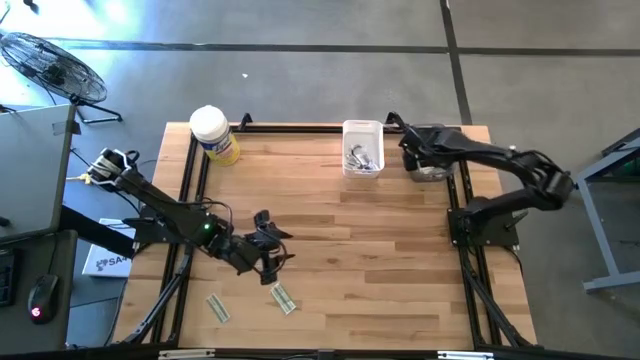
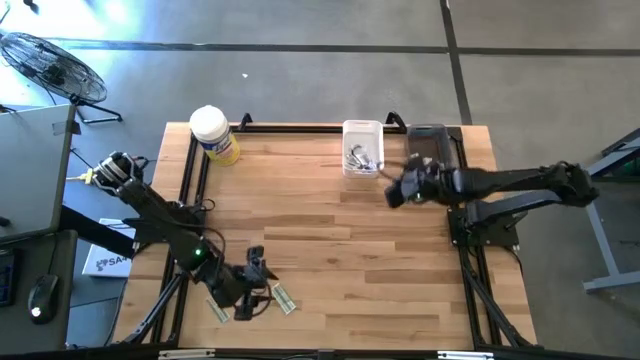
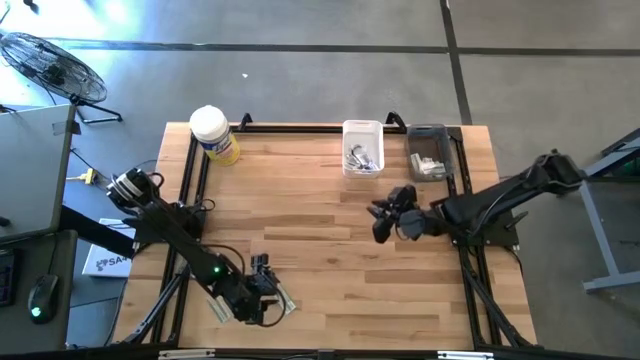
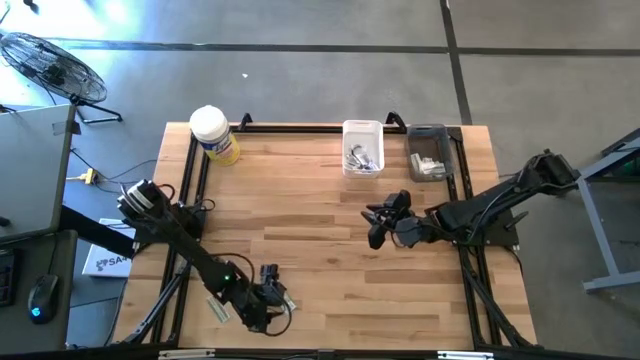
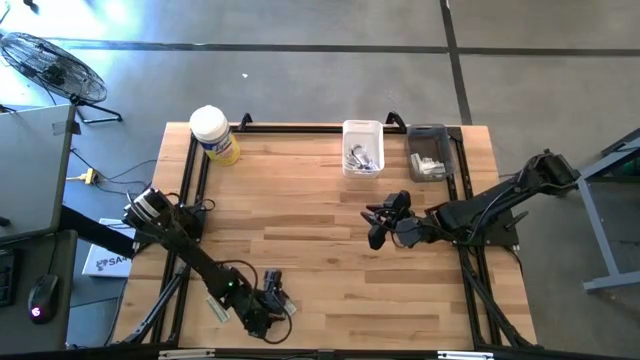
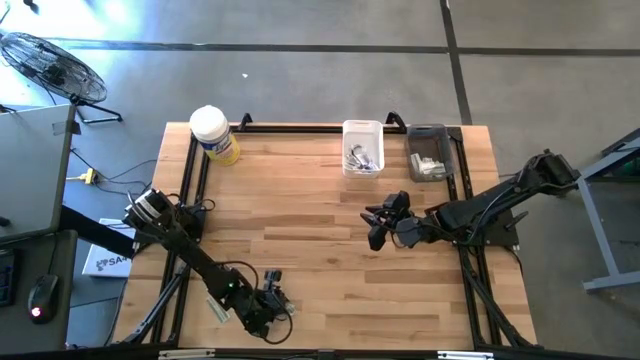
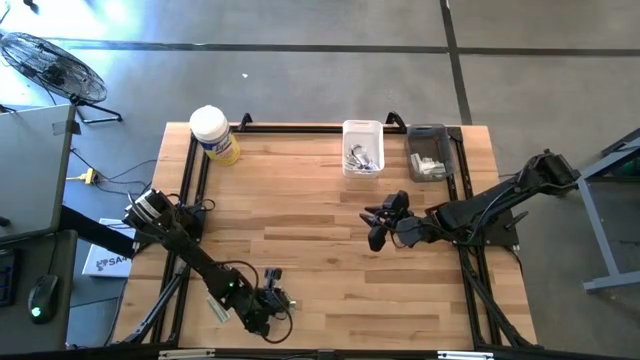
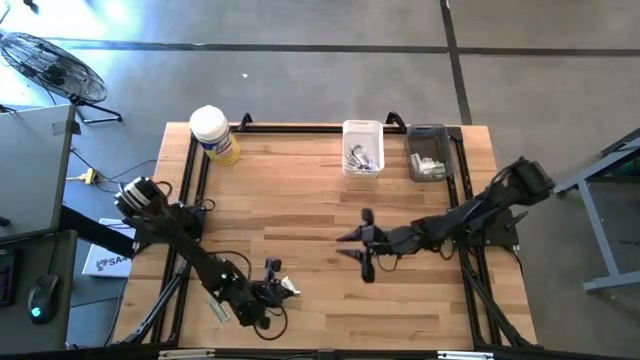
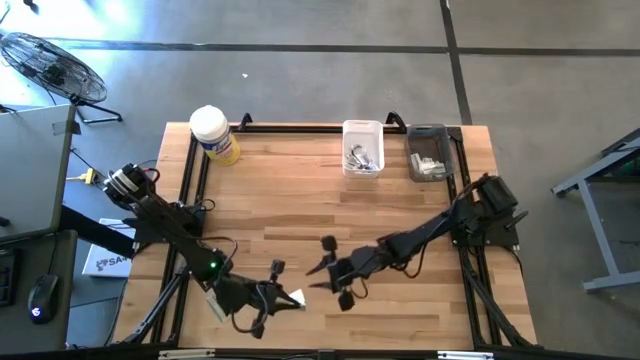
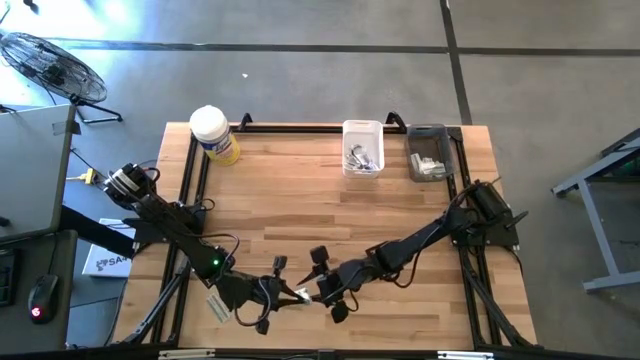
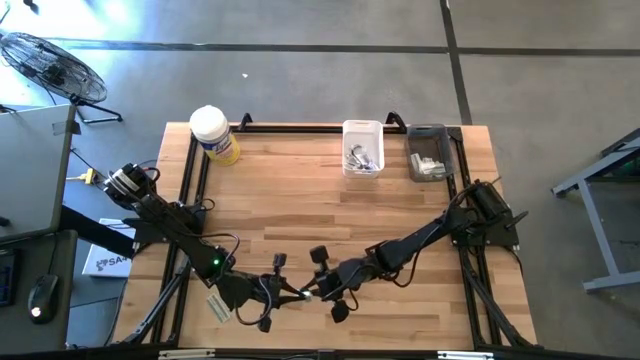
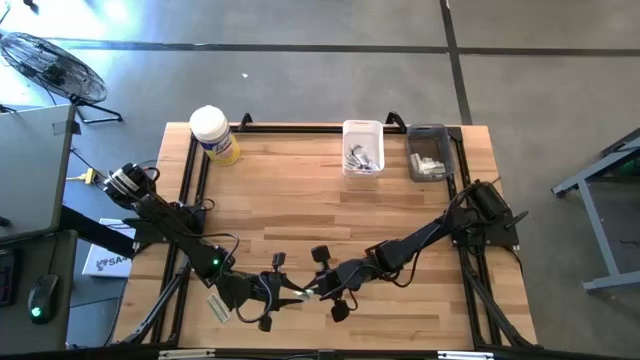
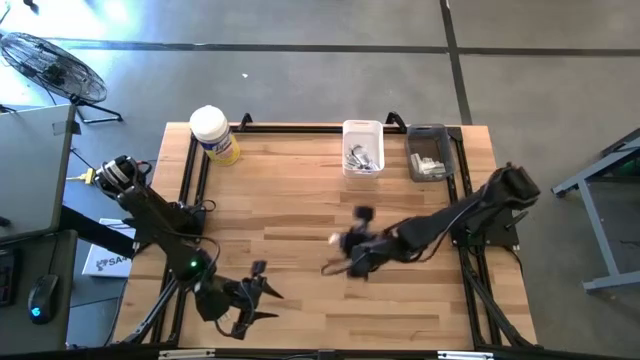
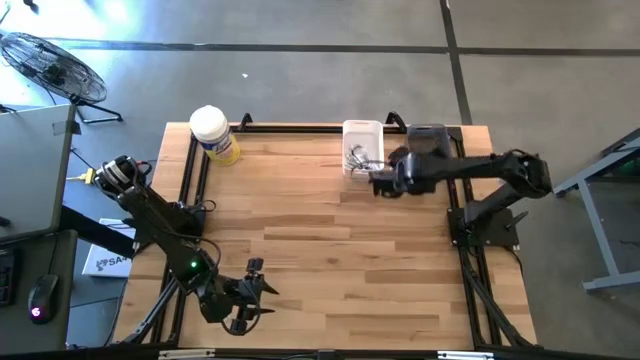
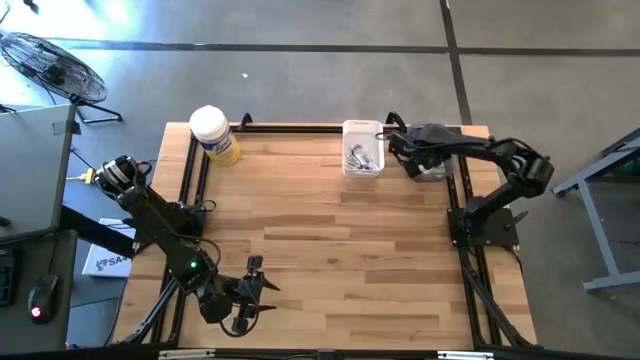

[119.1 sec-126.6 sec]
Task: Pick & Place First Aid Supplies
Put the green bandage into the black bin

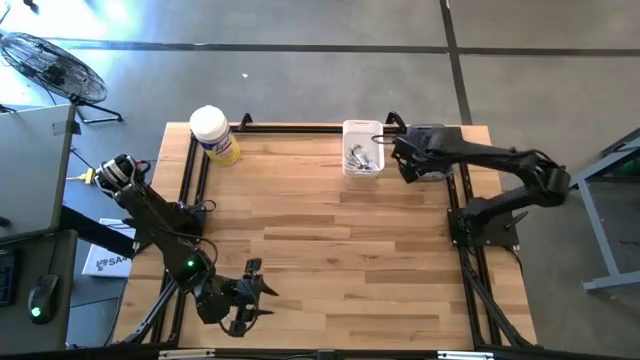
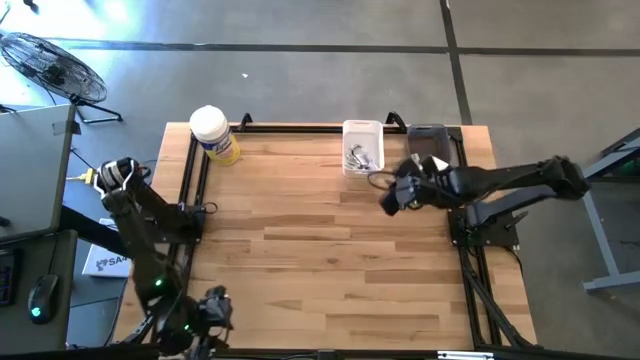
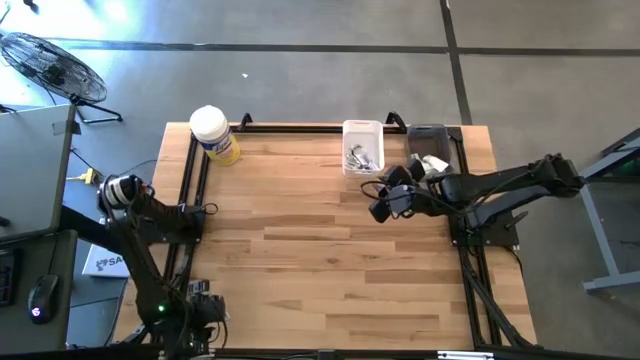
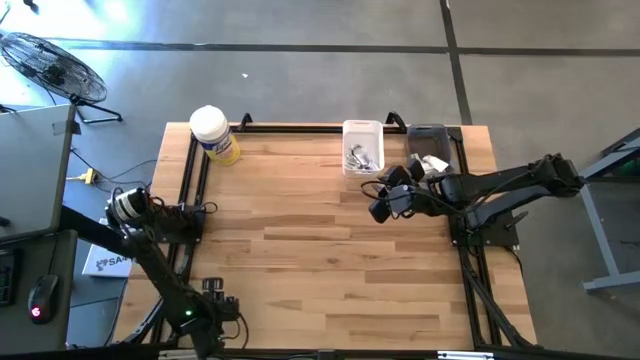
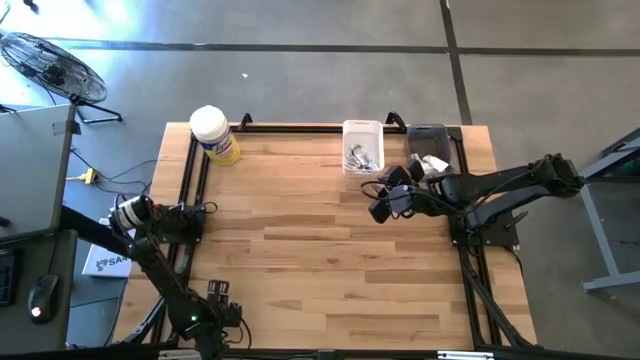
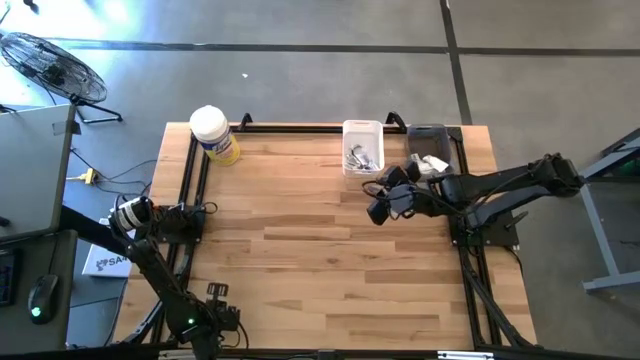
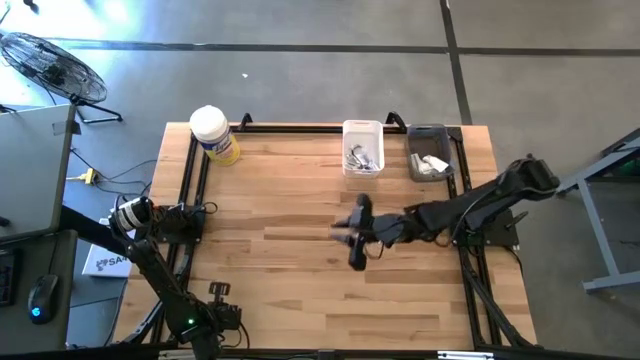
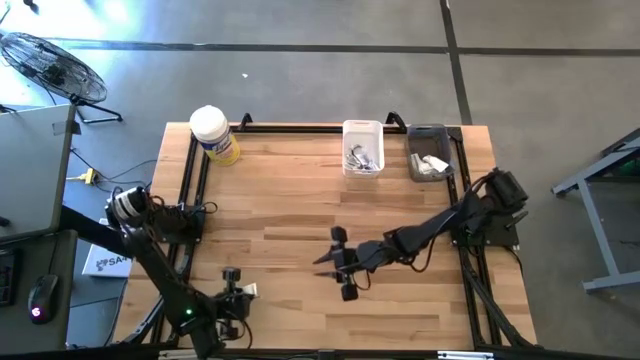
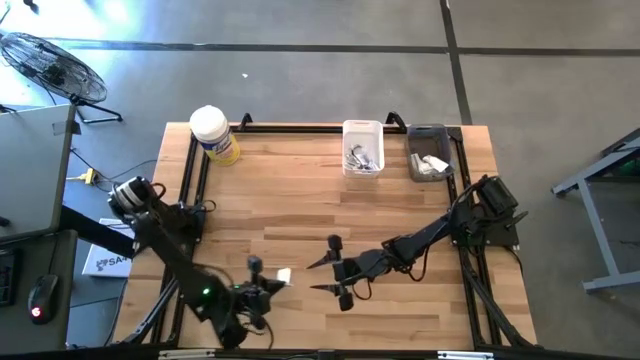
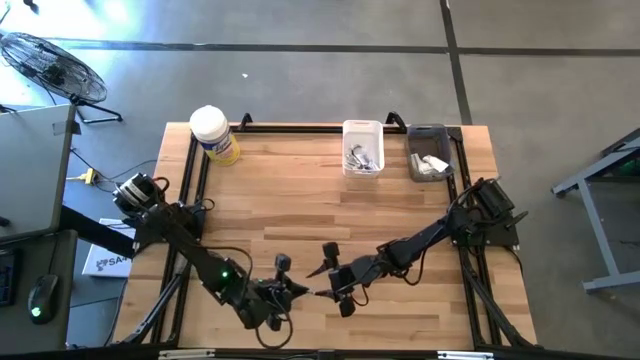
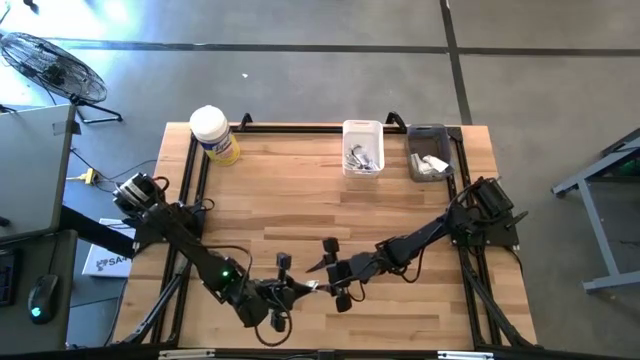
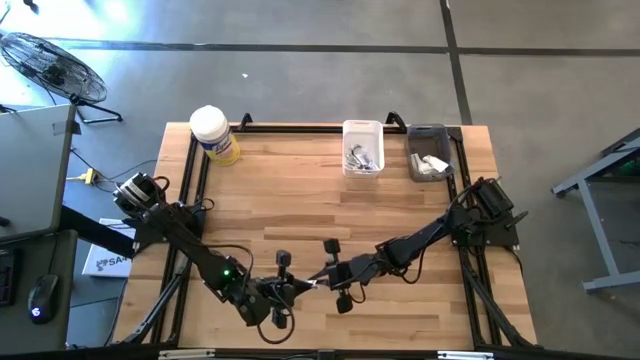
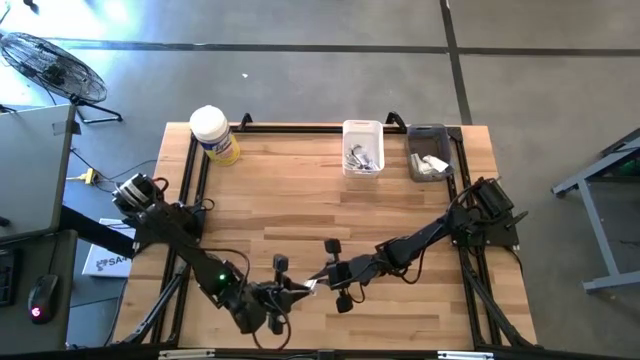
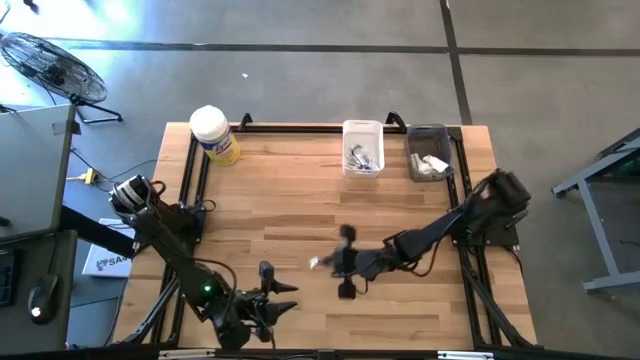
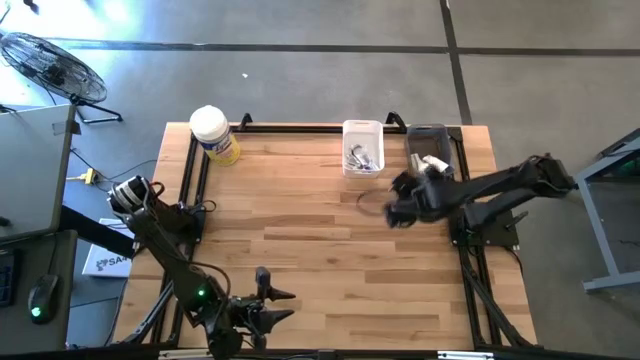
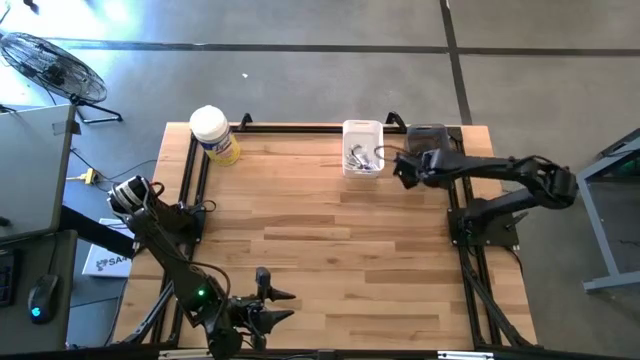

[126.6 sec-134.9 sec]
Put the green bandage into the black bin

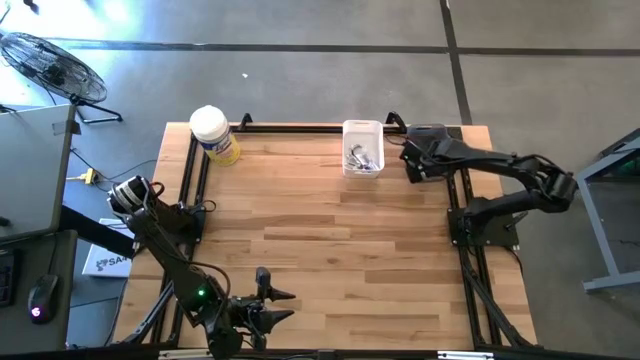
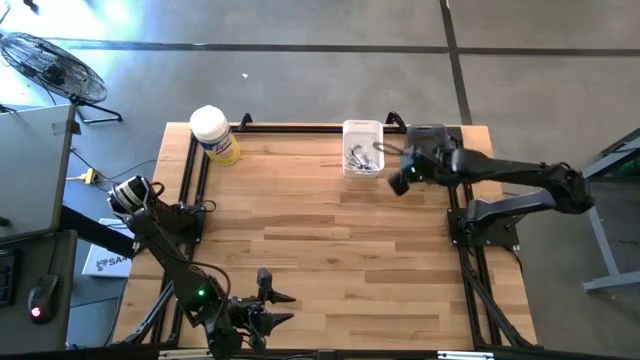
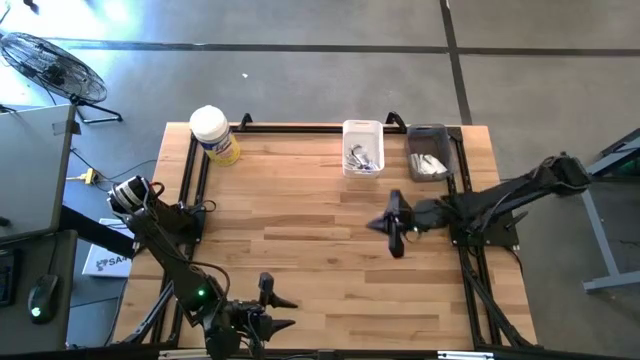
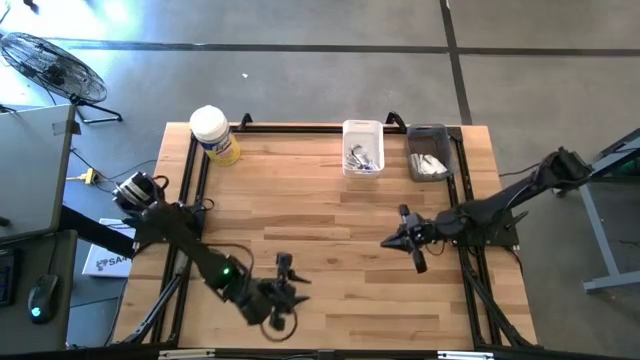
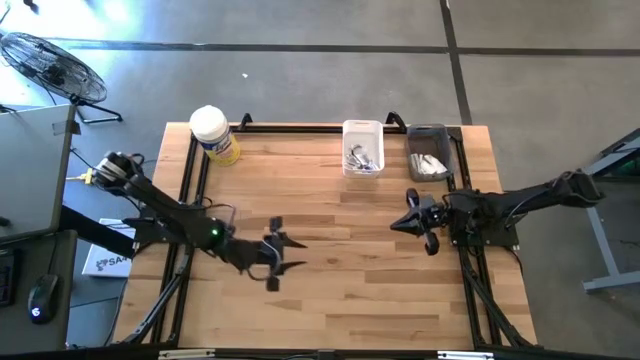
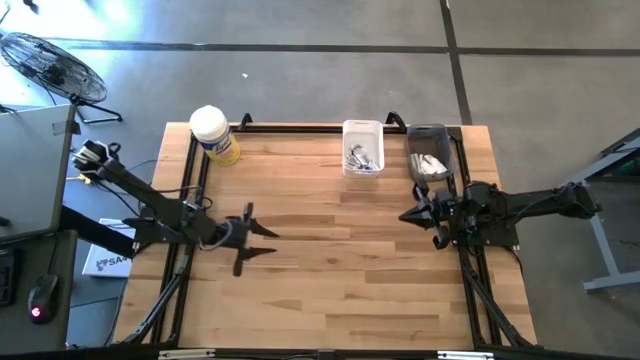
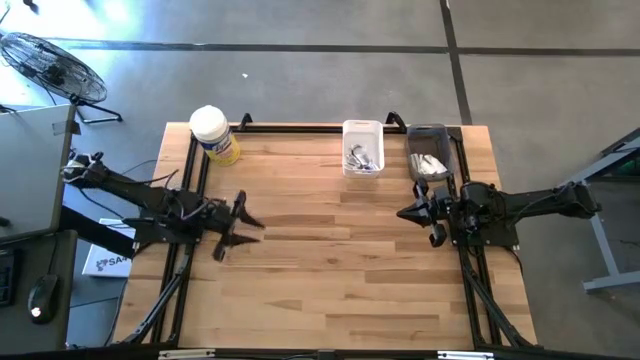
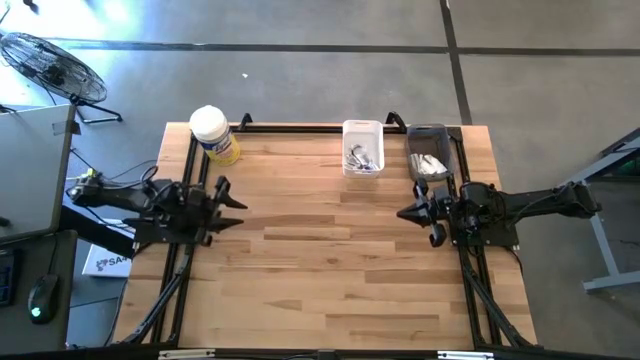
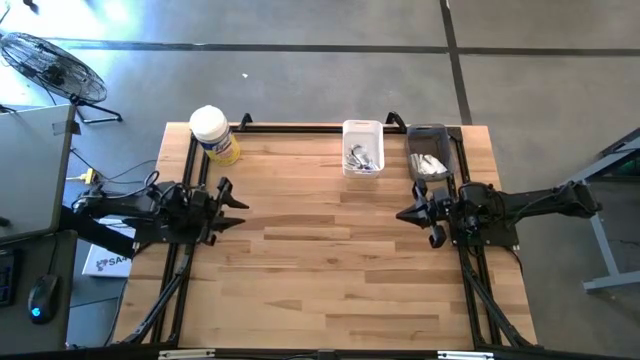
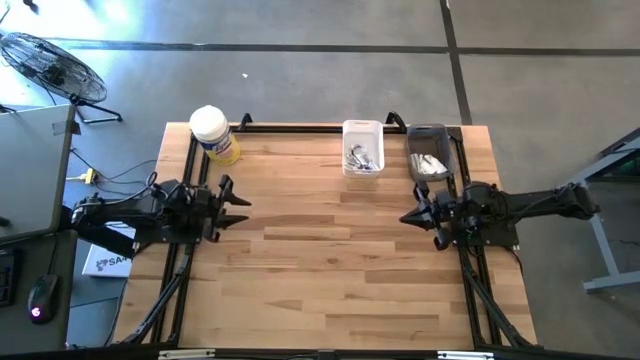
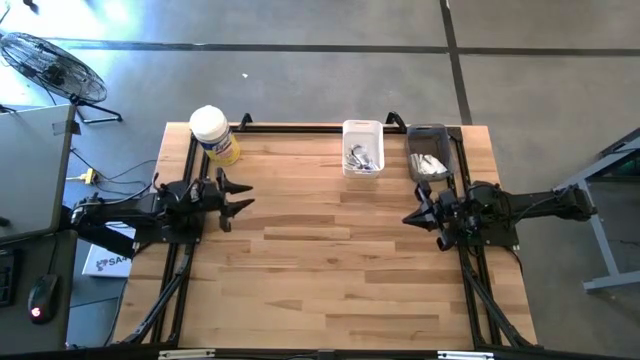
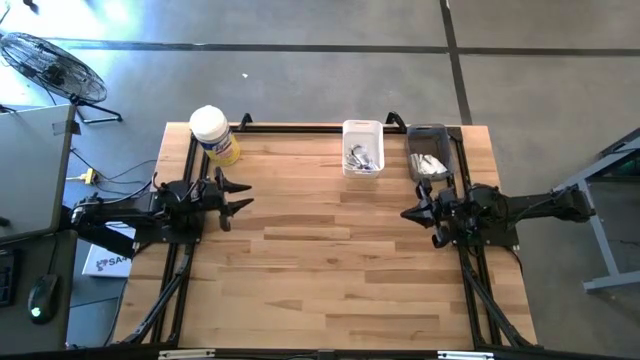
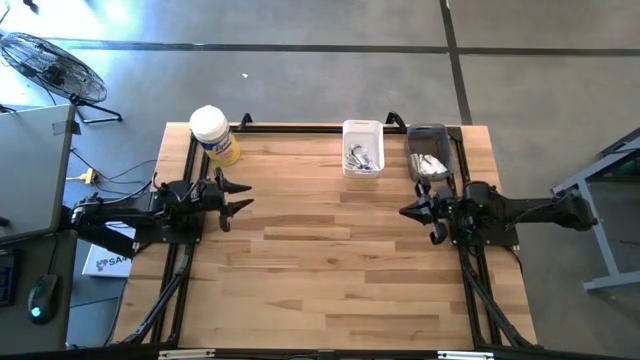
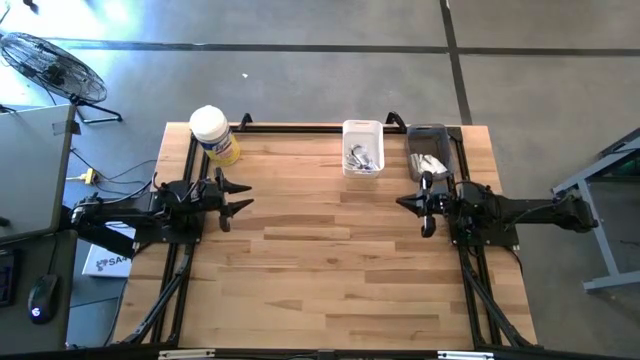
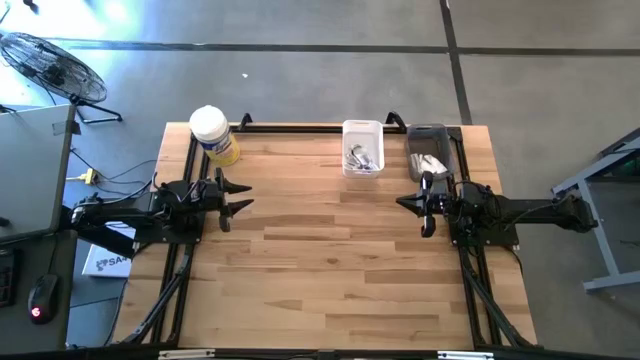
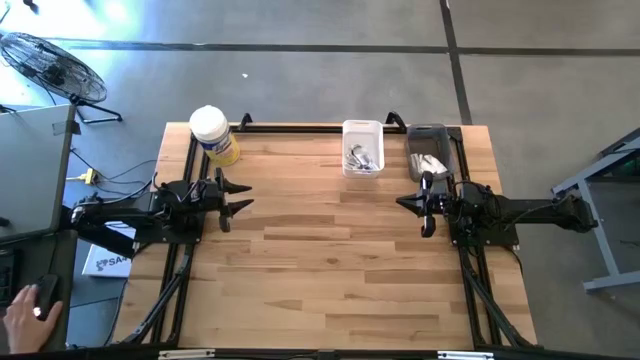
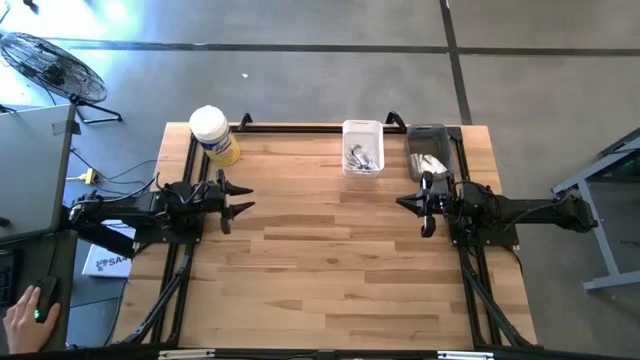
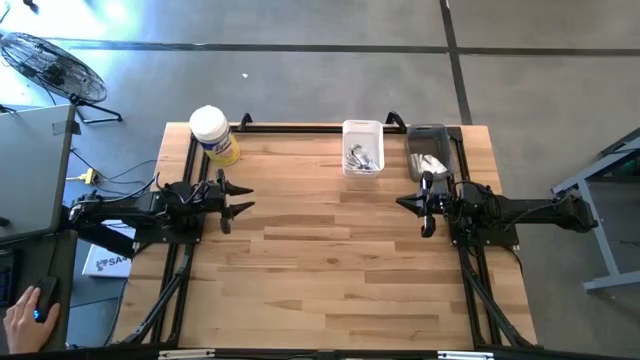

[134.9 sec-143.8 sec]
Return to Home Position
